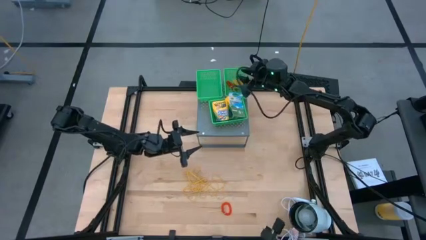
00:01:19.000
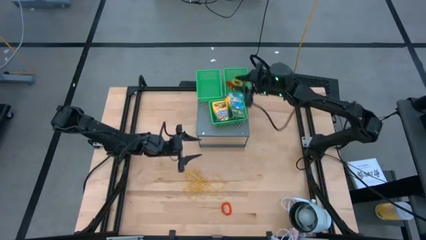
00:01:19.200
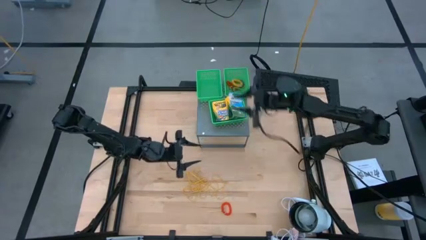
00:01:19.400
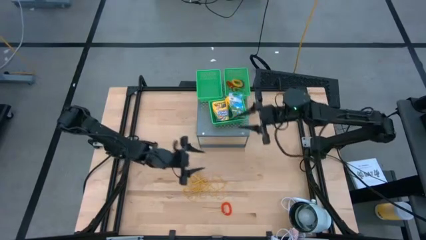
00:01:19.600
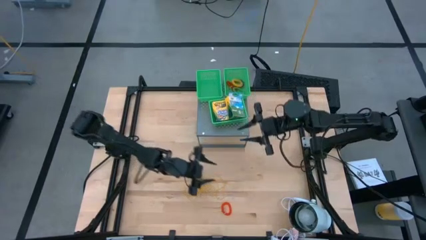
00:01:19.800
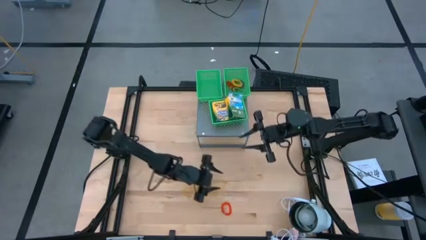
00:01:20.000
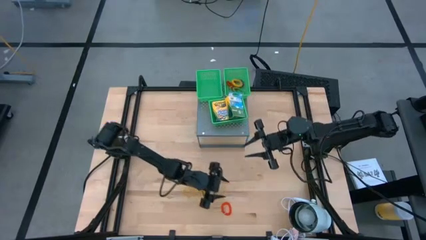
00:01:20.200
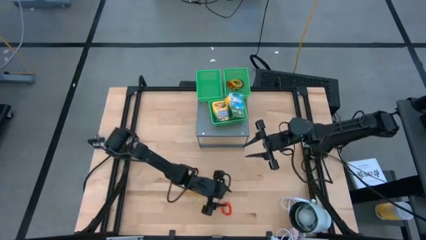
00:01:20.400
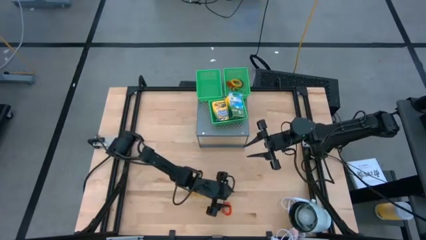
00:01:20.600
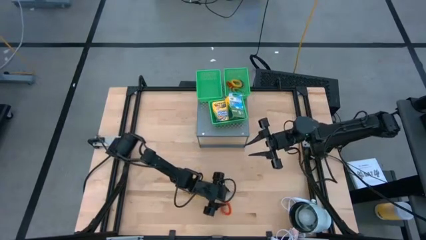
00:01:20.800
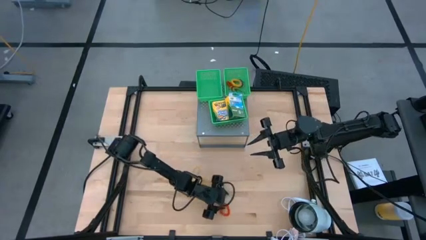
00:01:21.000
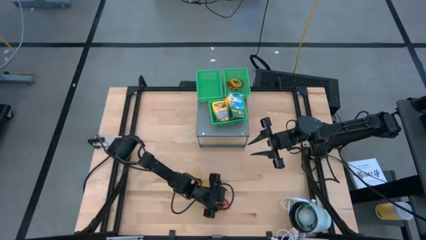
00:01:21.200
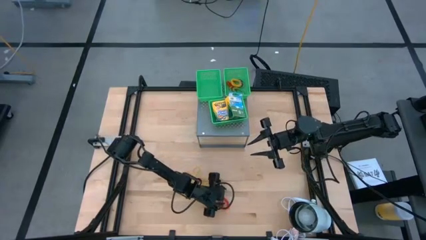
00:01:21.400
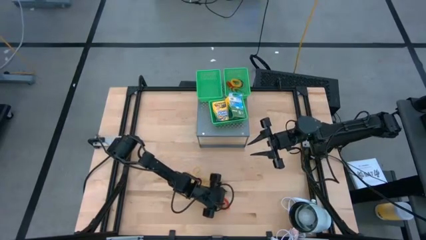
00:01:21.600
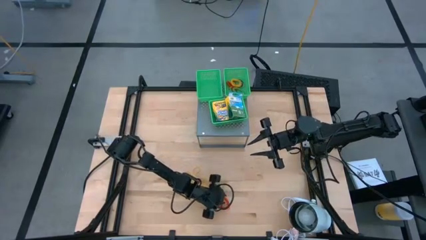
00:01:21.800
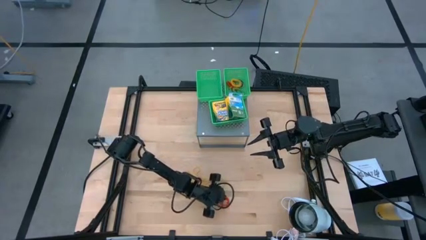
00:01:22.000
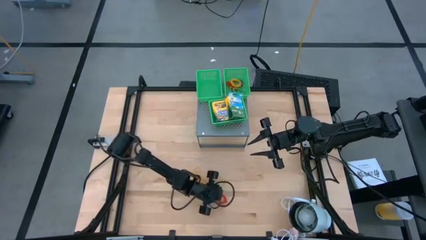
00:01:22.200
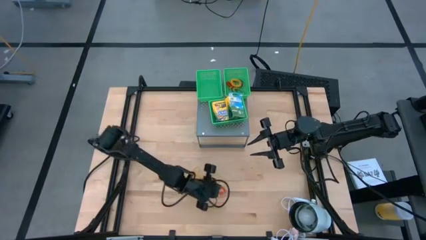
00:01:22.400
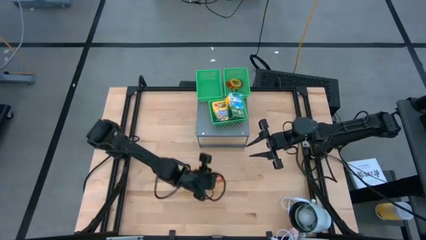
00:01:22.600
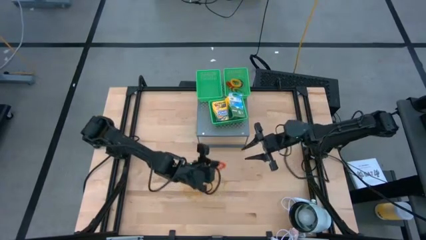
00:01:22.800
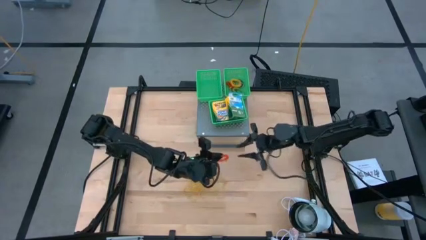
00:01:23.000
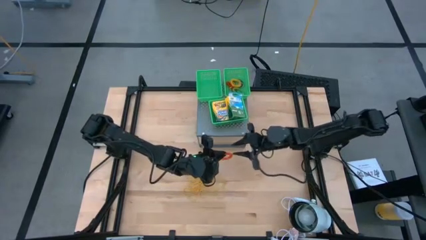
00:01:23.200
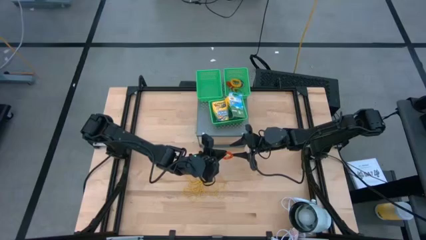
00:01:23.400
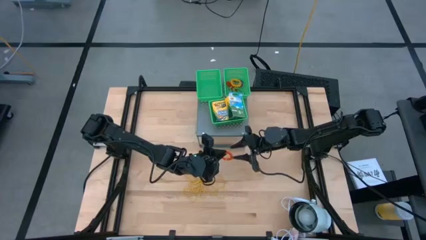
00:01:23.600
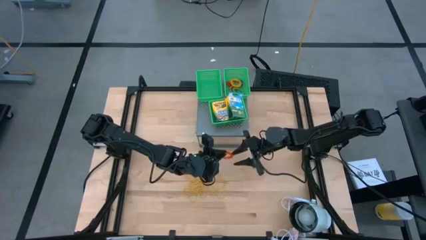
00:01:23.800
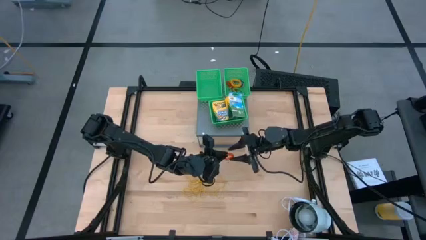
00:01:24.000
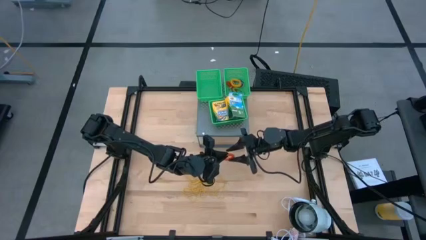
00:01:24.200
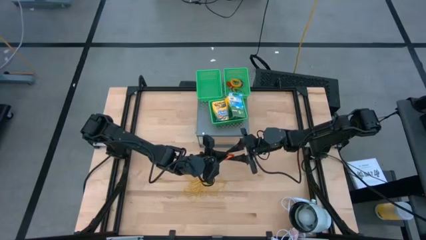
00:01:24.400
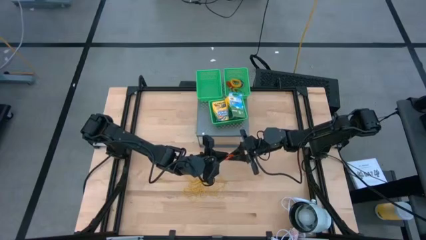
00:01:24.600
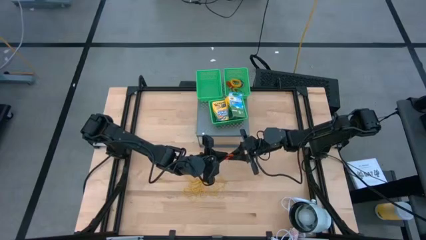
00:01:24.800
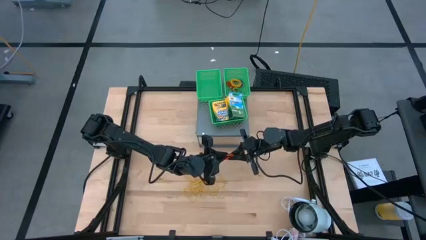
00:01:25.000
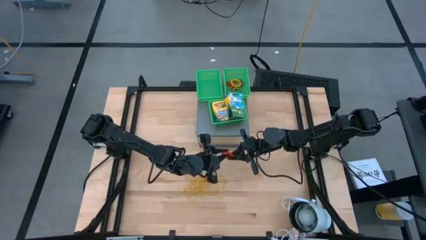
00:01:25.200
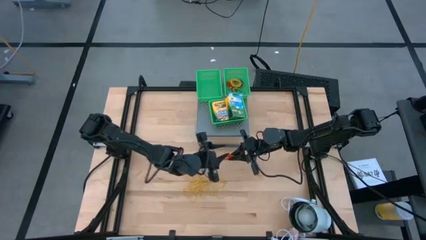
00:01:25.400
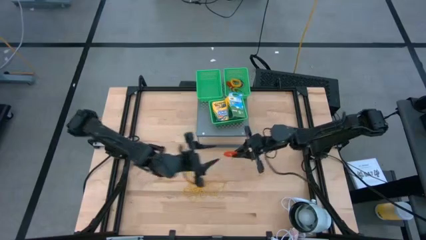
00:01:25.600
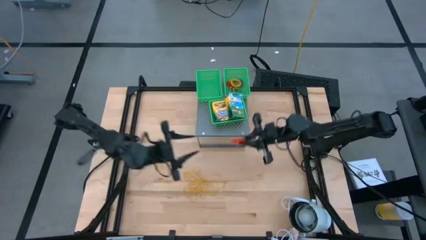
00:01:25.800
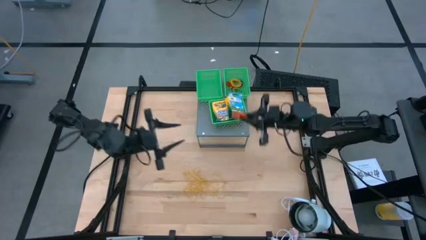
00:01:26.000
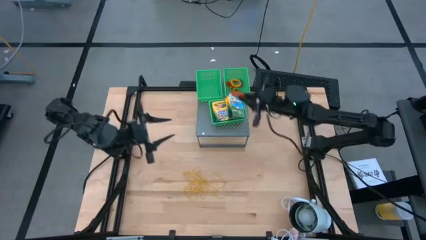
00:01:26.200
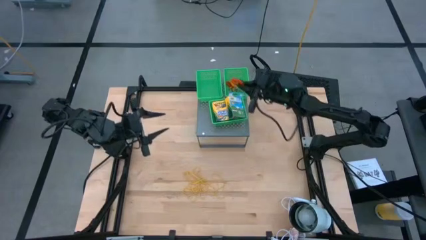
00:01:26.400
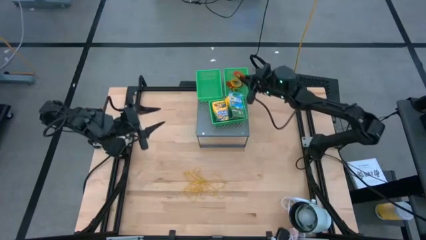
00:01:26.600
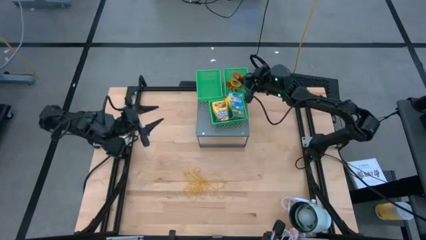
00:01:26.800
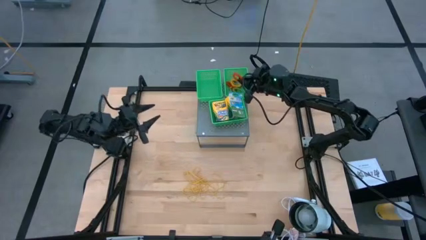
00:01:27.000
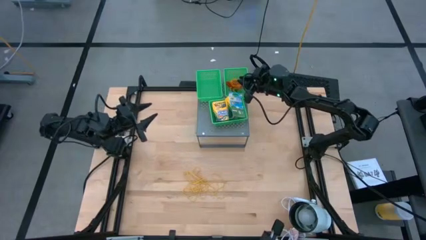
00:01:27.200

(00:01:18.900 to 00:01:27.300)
Task: Pick & Place Office Desk Supplies
Put the orange spring keychain into the right green bin on the shelf

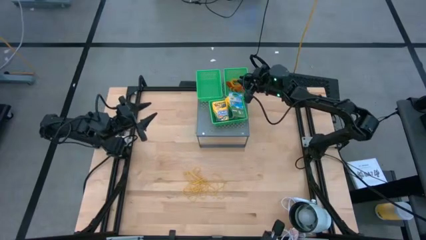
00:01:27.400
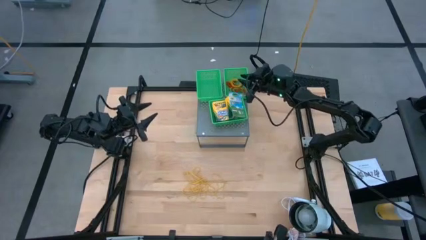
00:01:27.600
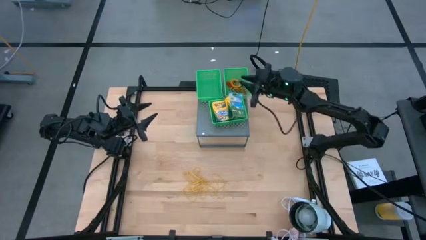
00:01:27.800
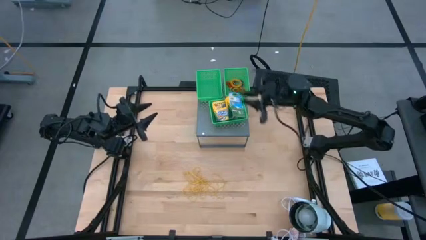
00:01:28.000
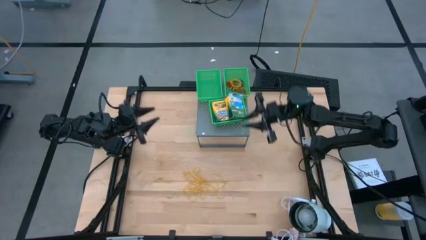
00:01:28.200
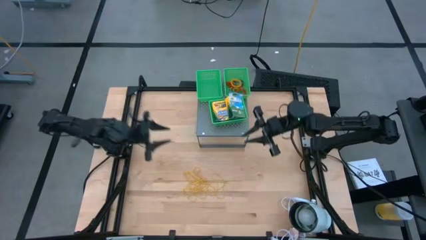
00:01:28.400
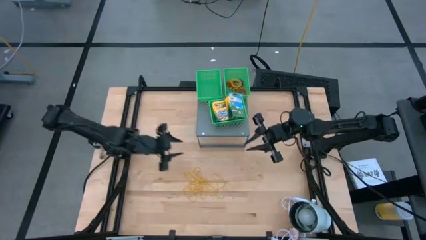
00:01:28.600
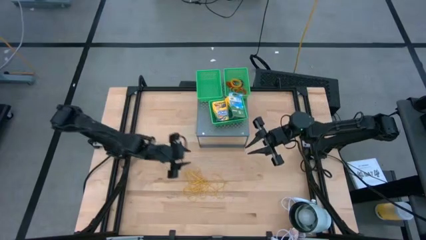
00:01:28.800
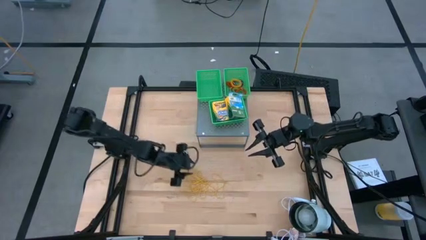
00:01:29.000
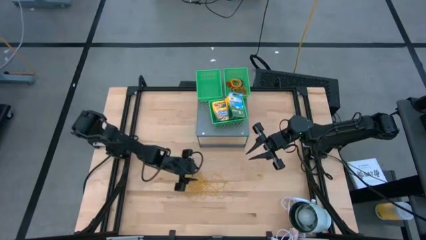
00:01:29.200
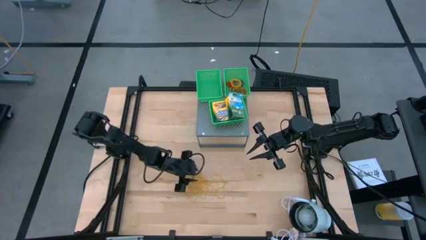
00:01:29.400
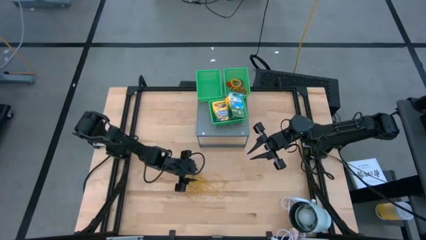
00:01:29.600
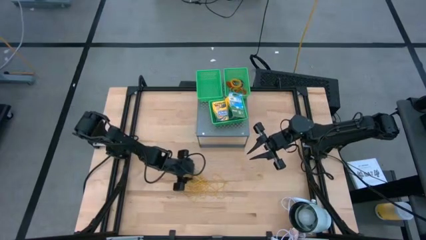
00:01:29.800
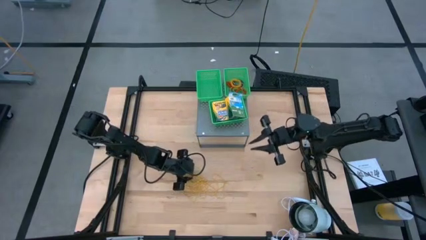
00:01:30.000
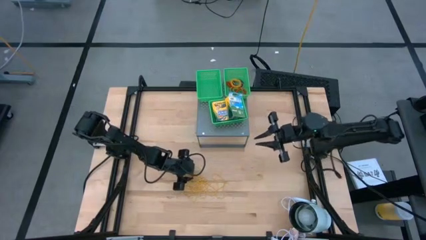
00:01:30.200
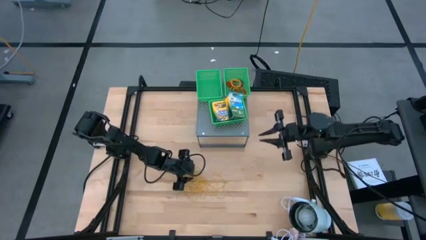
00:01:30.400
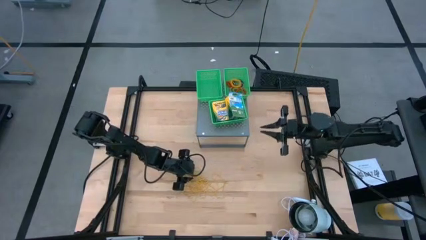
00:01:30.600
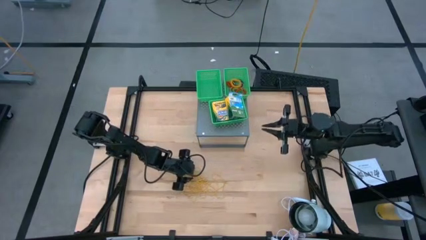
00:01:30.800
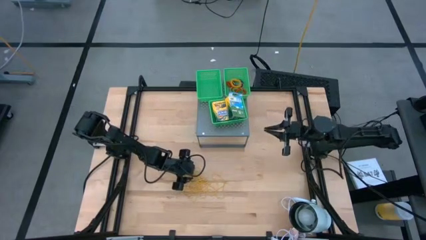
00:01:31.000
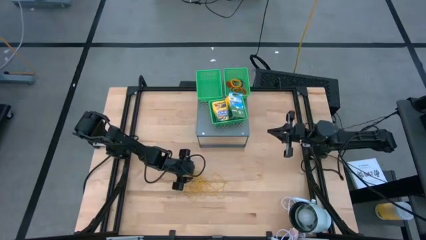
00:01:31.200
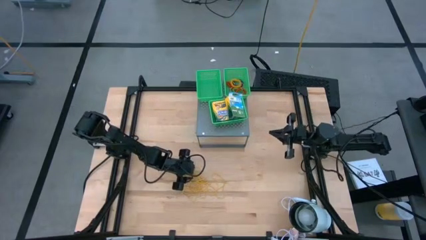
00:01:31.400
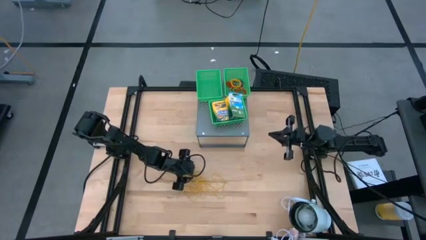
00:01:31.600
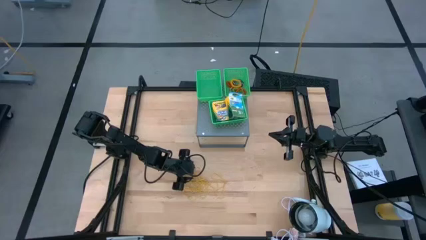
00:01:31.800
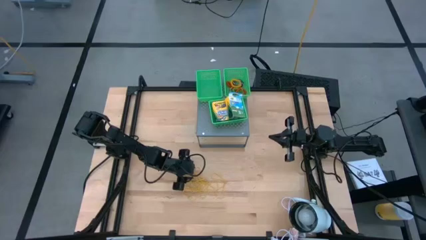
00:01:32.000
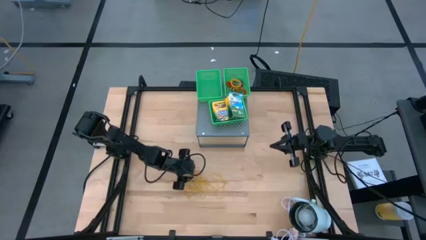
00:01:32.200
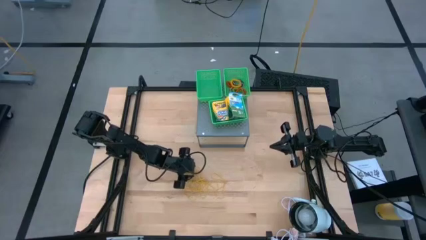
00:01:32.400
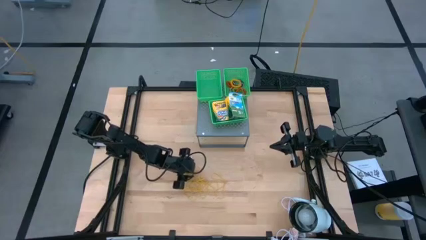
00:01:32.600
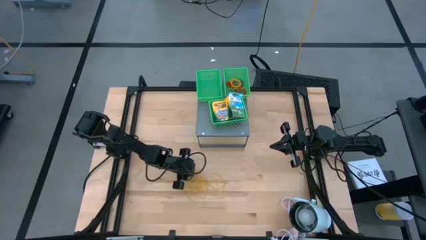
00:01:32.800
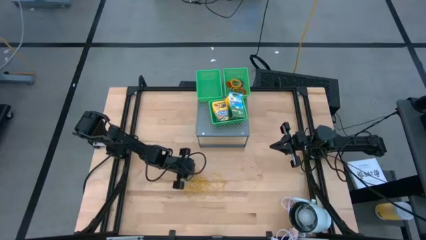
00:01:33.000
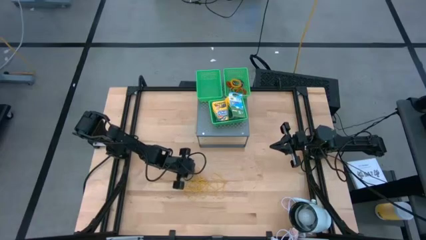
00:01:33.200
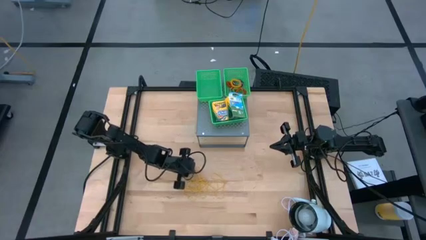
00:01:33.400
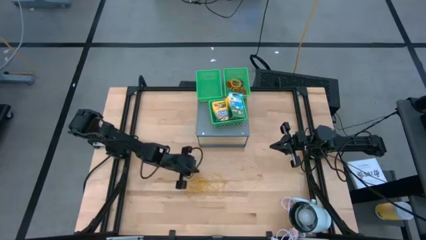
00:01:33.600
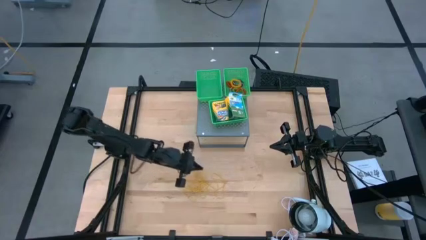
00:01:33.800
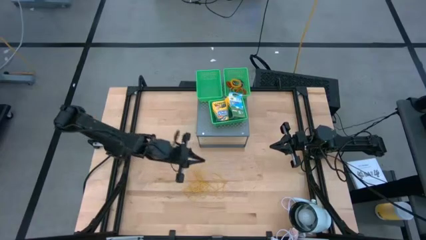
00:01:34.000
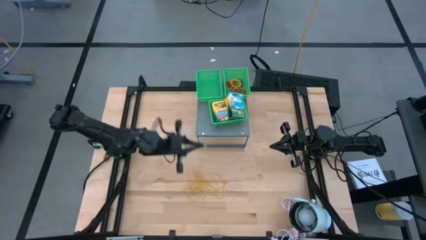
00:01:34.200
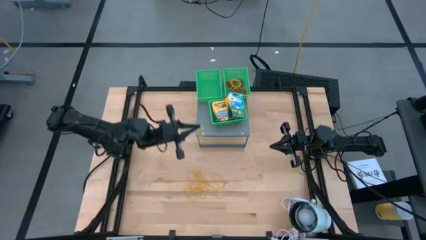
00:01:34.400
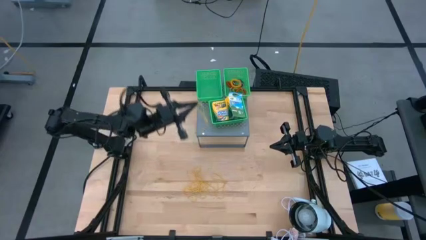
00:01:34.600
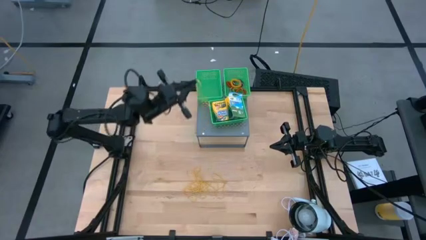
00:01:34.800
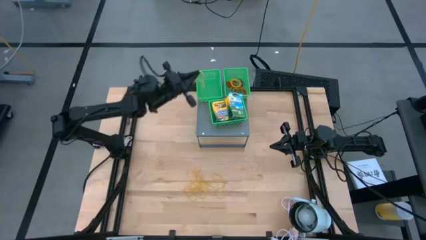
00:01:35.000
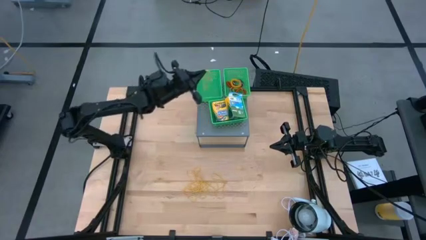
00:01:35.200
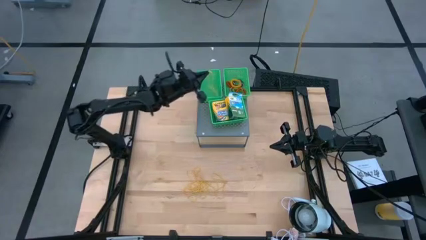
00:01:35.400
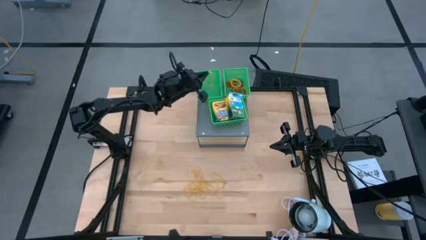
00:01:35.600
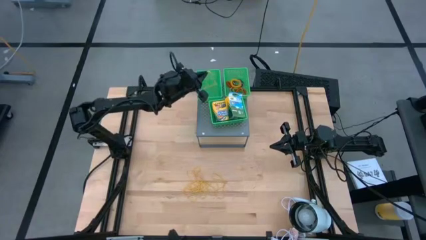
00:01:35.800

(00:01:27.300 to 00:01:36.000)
Put the yellow rubber band into the left green bin on the shelf
